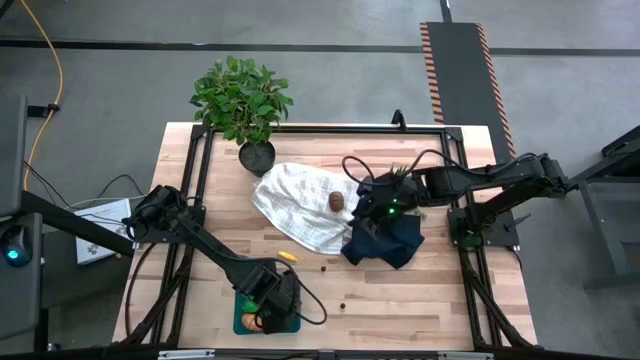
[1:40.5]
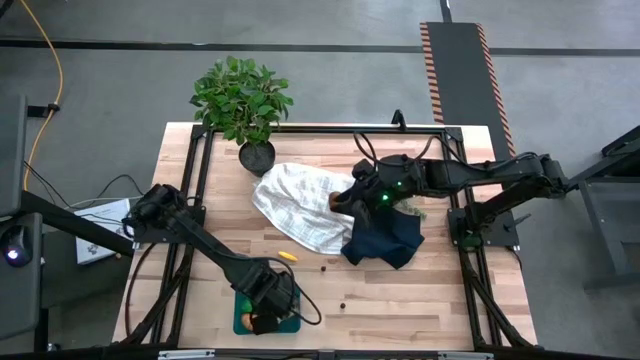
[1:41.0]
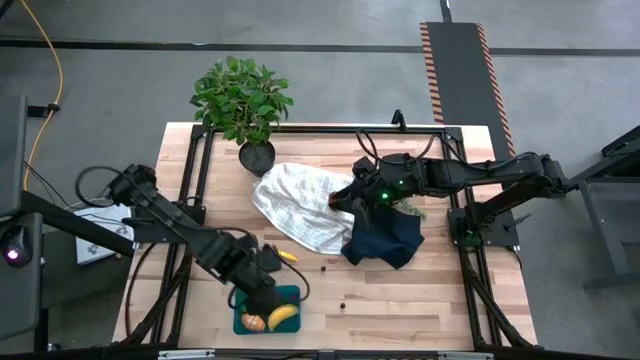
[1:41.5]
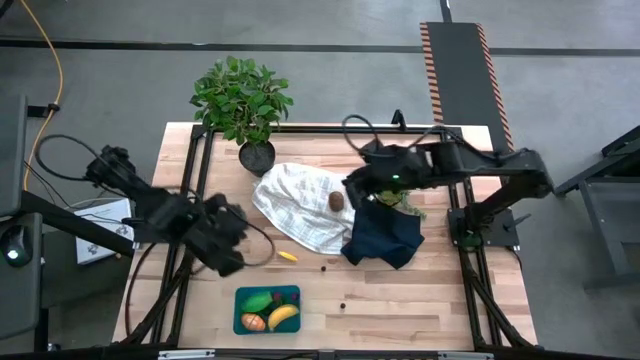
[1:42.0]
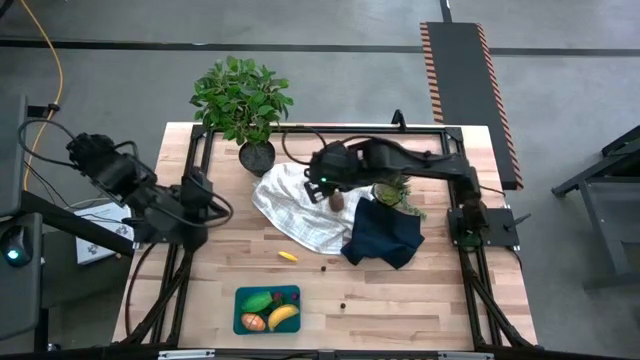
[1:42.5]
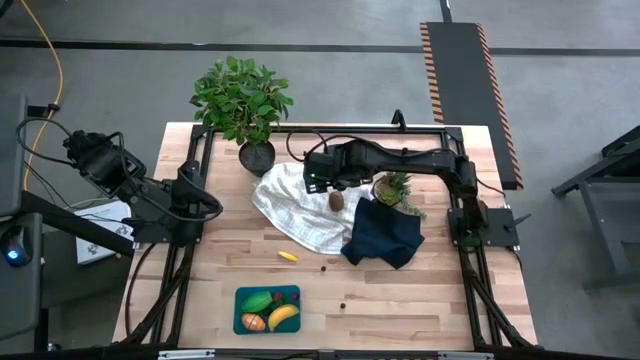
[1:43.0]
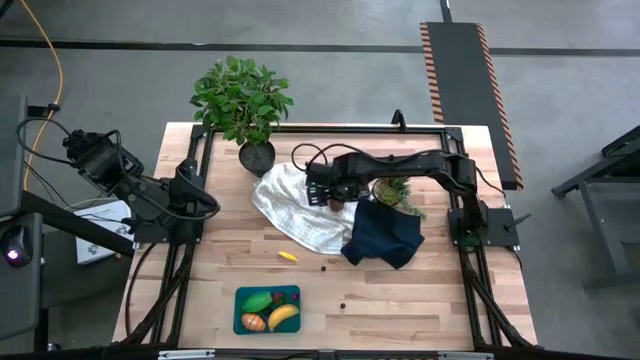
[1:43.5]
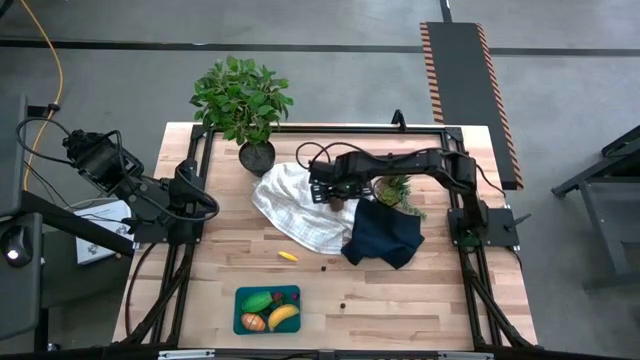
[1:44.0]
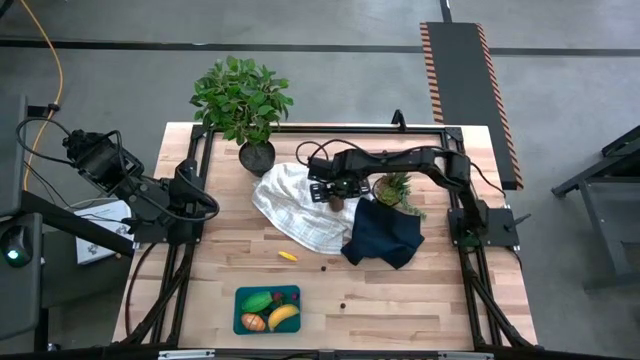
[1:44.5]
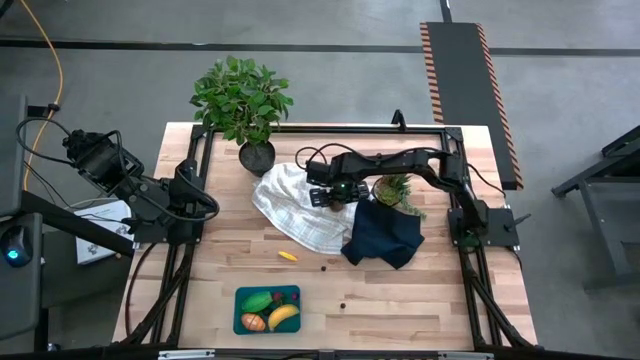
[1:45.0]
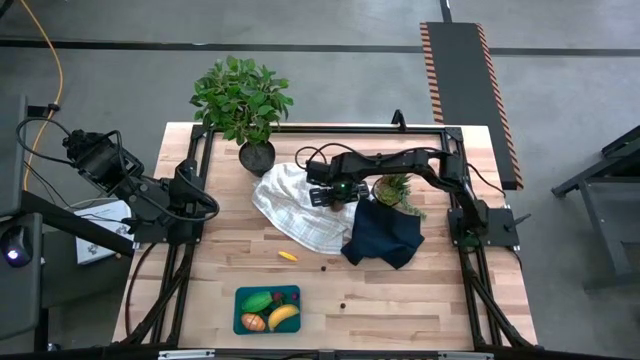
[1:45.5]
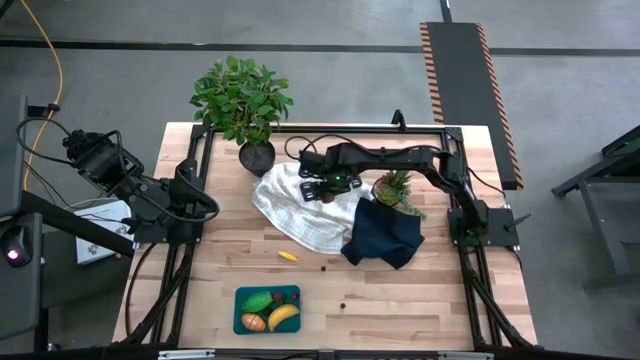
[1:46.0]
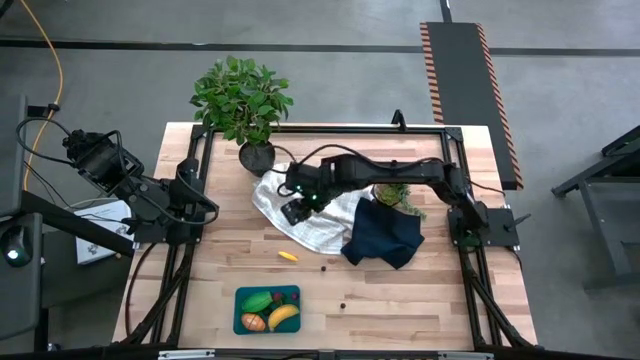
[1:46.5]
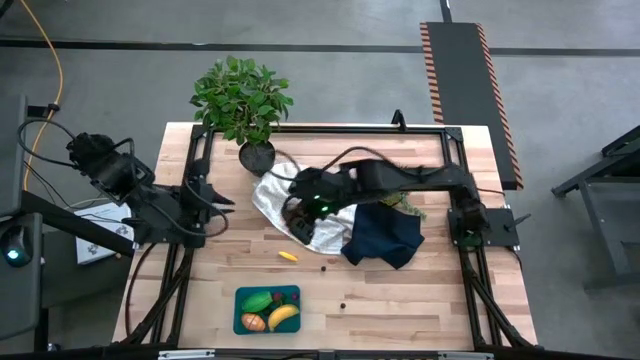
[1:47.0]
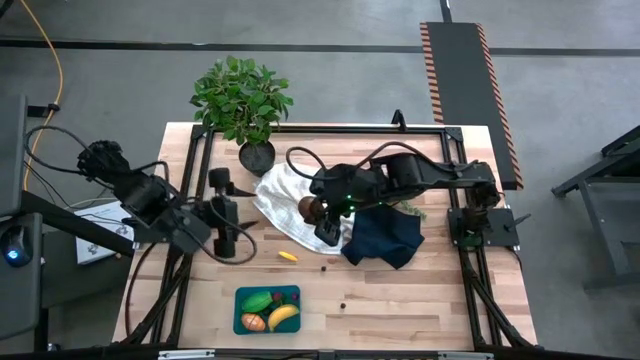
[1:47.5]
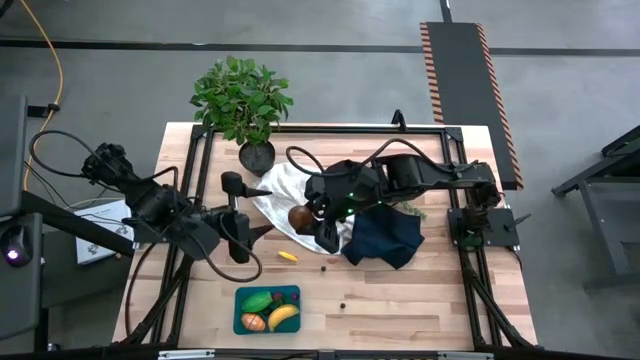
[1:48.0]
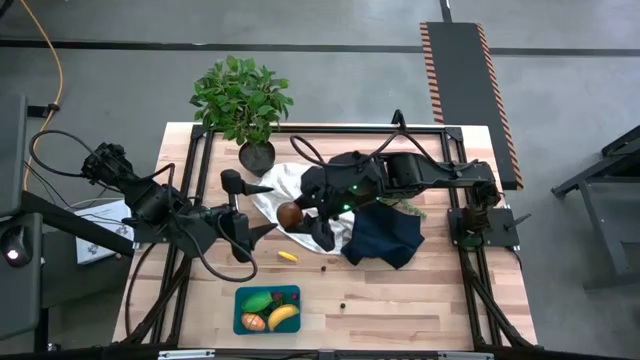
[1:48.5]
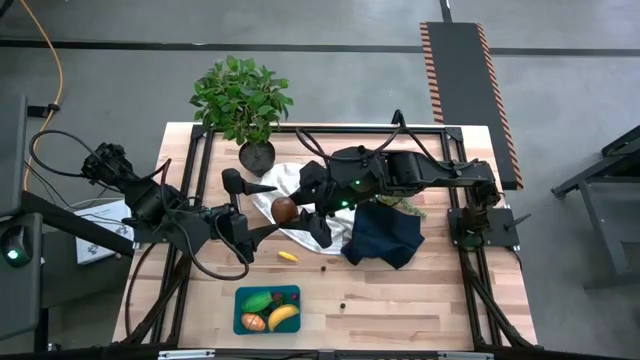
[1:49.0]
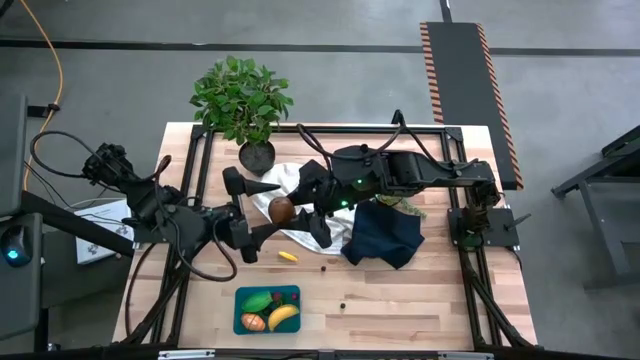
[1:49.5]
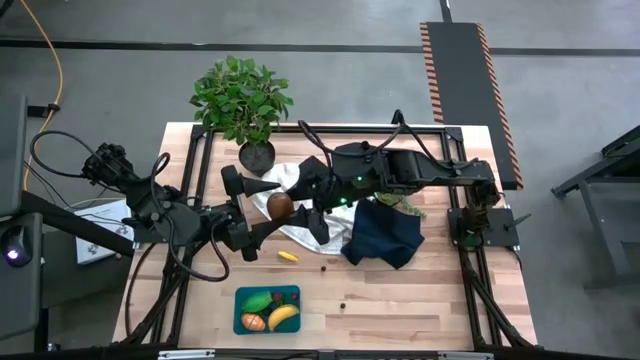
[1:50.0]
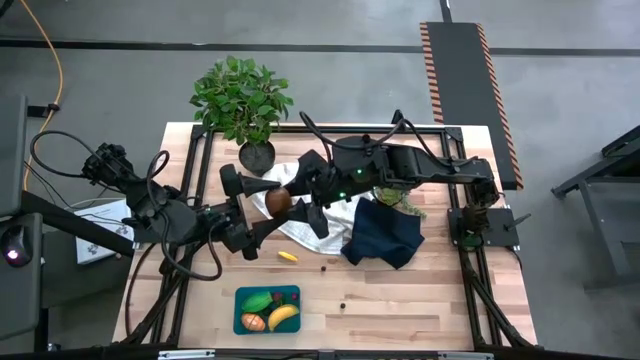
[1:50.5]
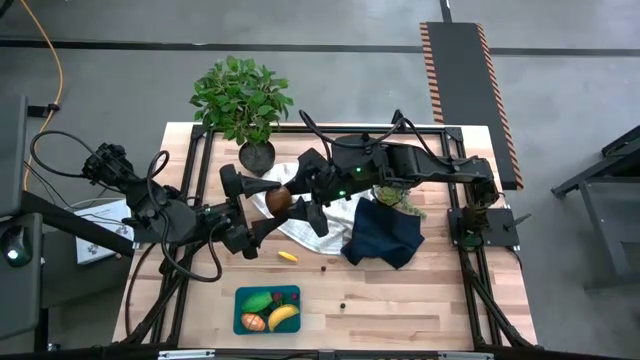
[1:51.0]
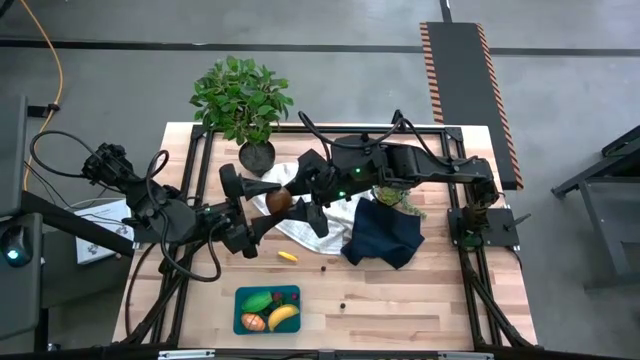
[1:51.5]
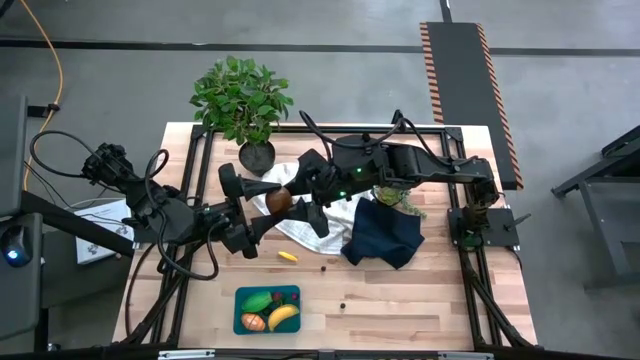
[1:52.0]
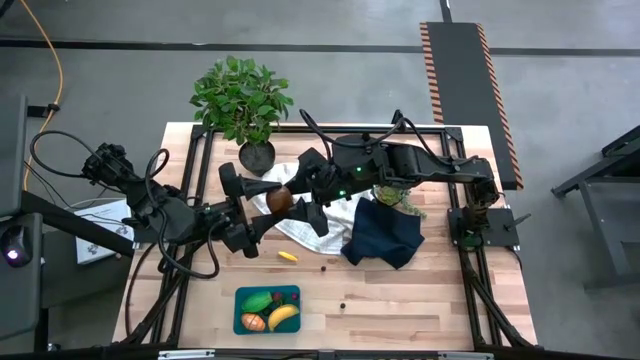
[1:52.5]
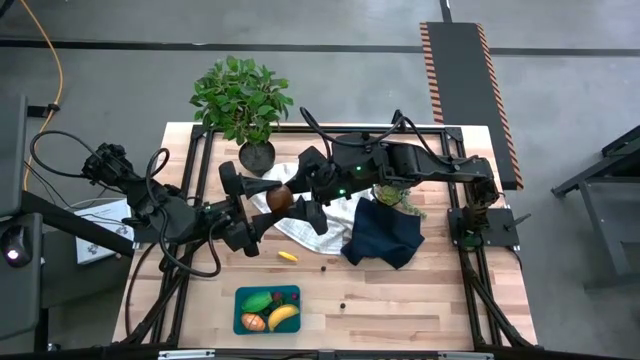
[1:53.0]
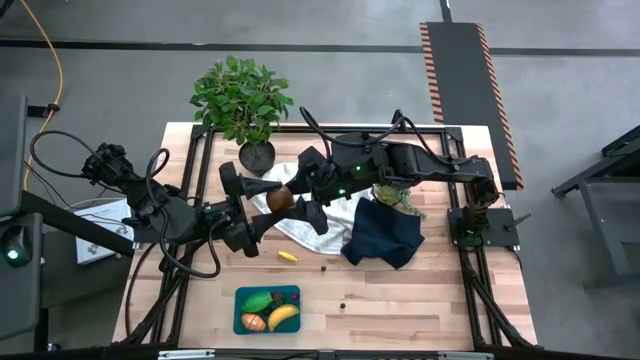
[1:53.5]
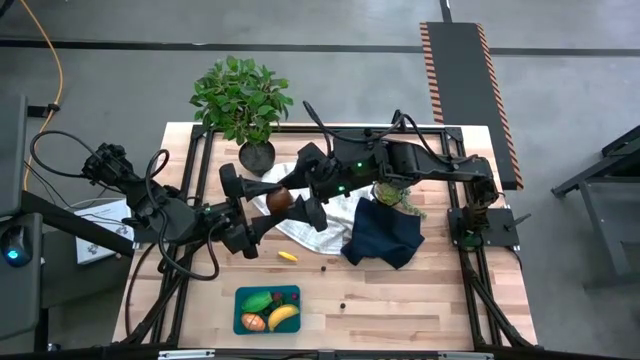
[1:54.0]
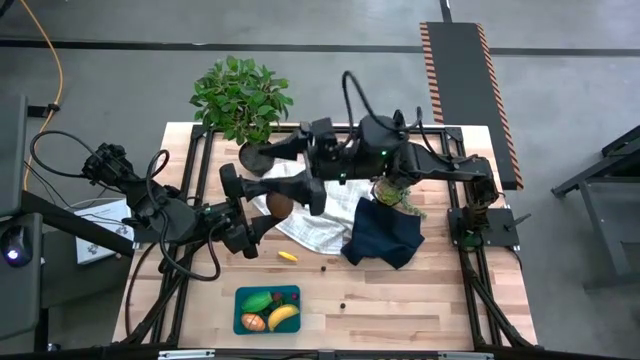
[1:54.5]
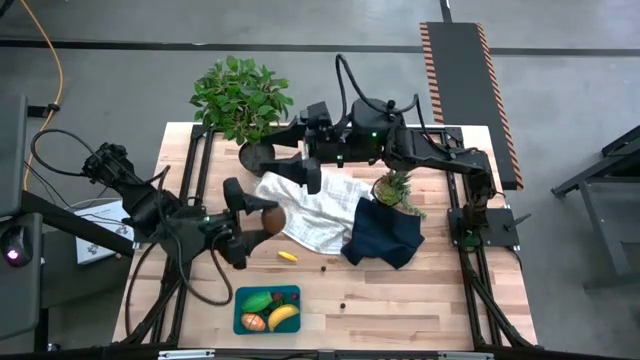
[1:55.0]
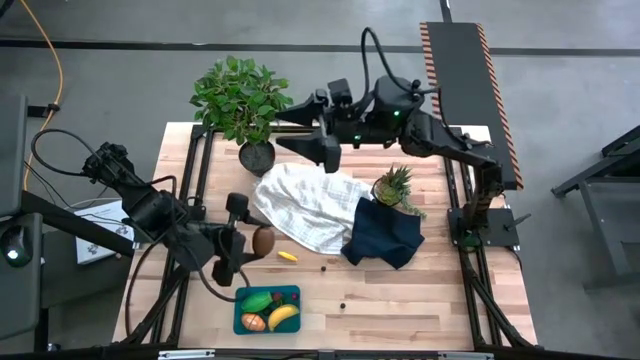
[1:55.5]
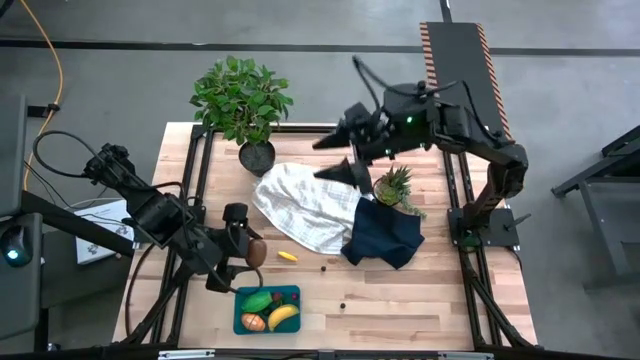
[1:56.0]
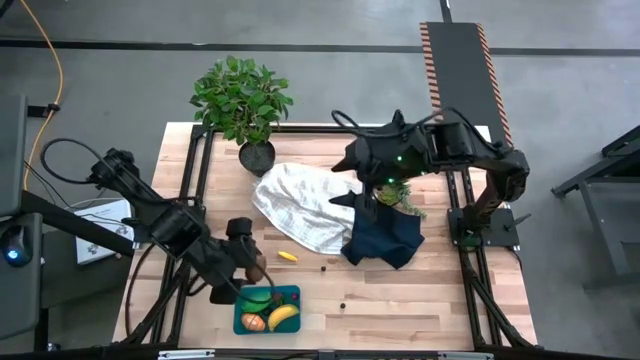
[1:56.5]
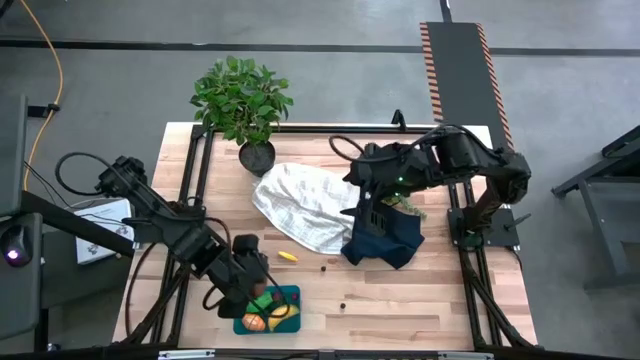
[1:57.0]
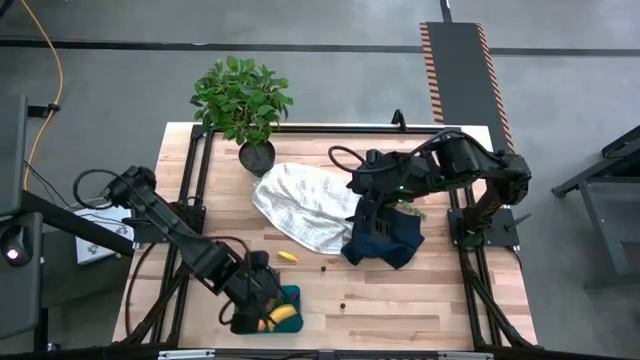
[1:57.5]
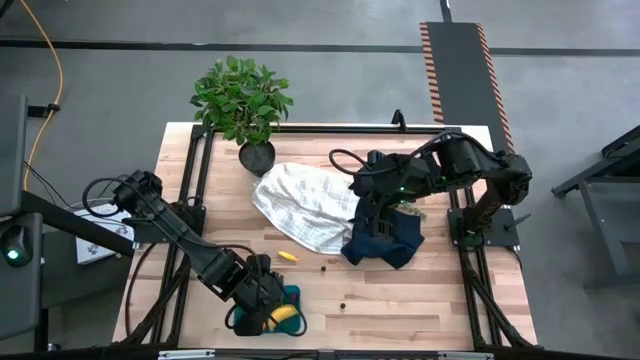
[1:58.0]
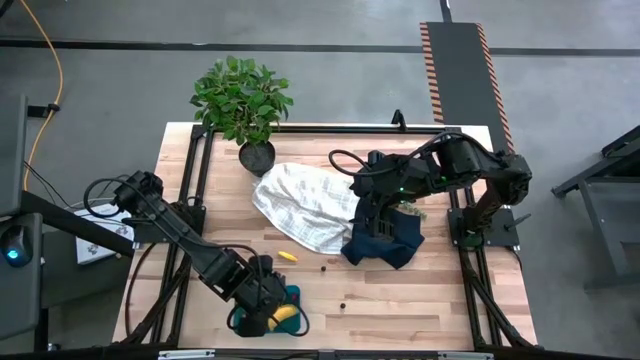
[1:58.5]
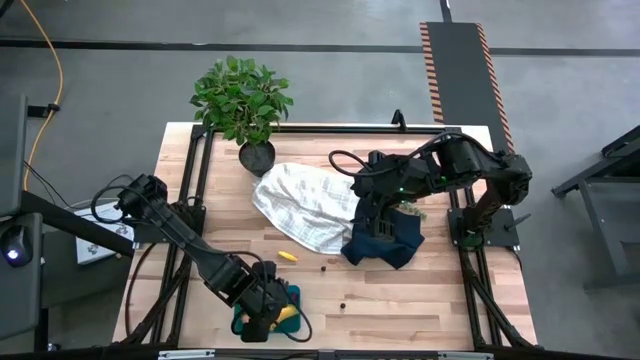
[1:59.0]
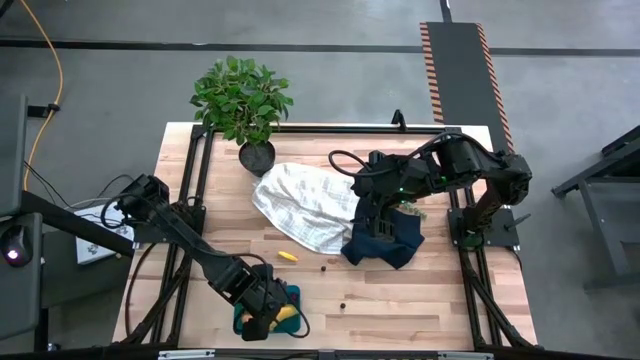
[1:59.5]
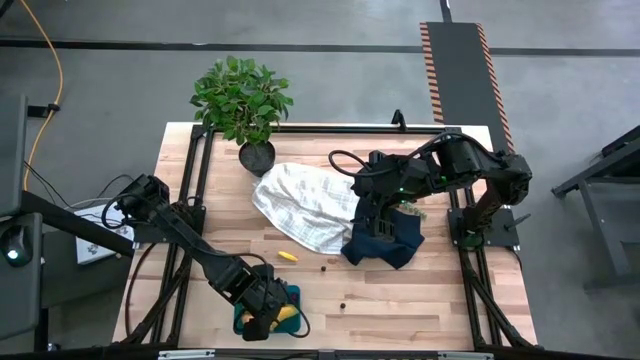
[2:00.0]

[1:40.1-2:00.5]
Task: Pick and placing Produce into tupperware
Put the kiwi into the bin

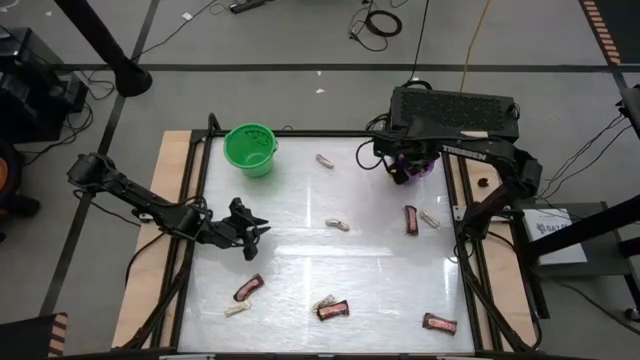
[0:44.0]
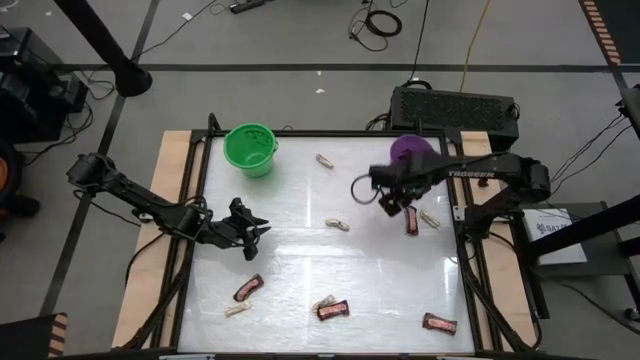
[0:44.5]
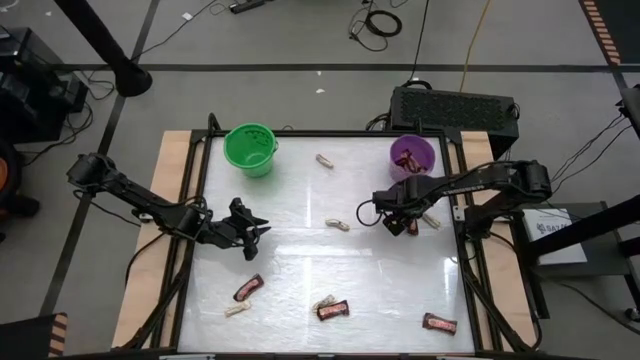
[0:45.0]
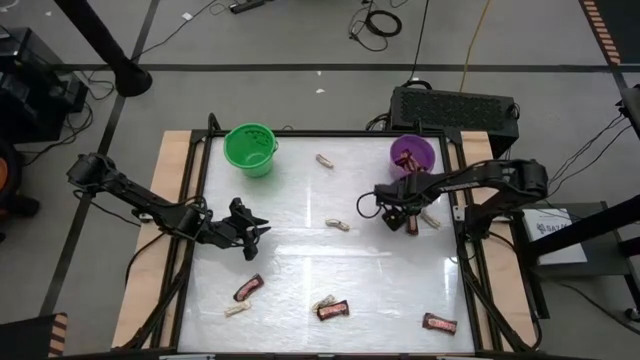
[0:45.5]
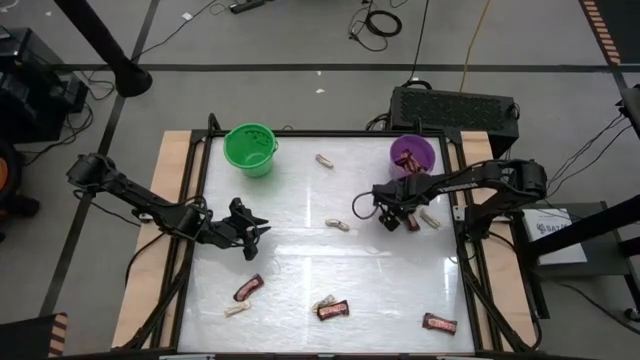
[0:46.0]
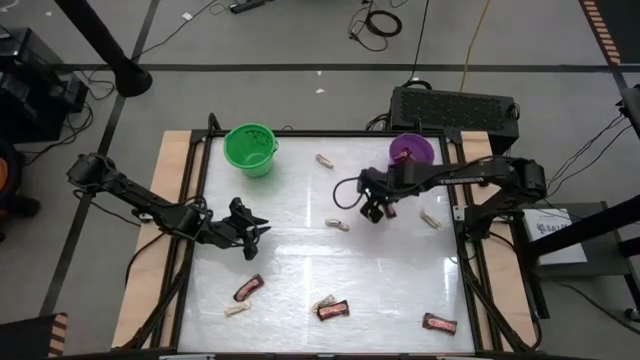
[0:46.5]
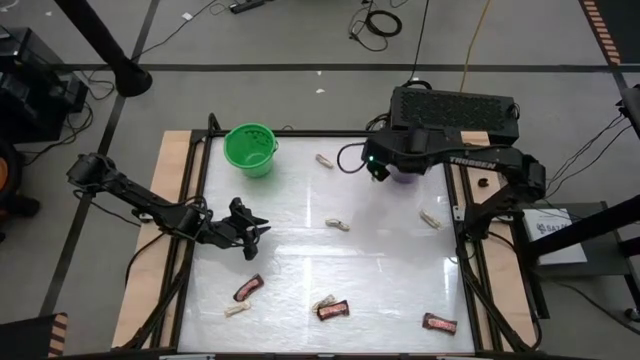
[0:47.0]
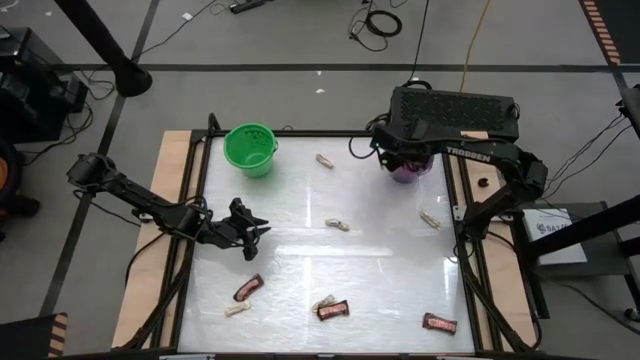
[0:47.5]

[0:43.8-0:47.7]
Task: Sort candy by brand, put in halloween buckets
Put the brown chocolate bar into the purple bucket
